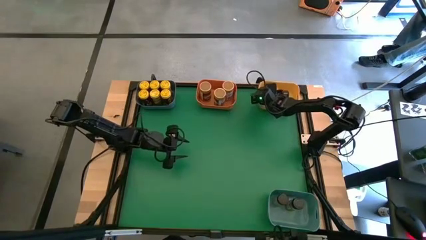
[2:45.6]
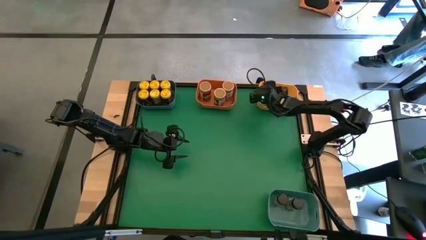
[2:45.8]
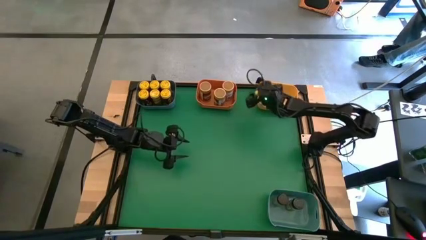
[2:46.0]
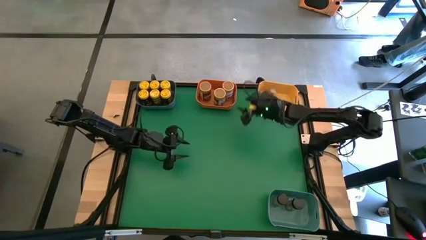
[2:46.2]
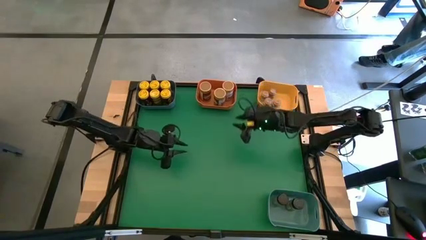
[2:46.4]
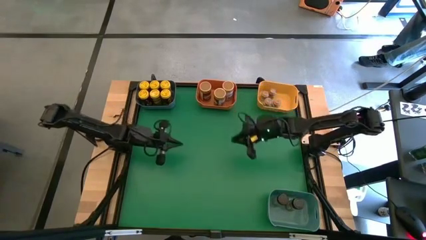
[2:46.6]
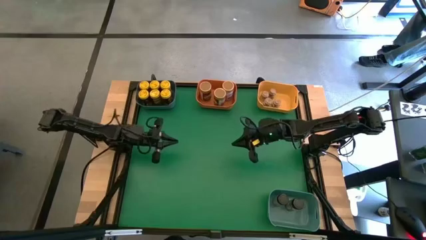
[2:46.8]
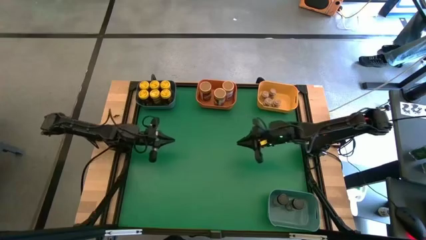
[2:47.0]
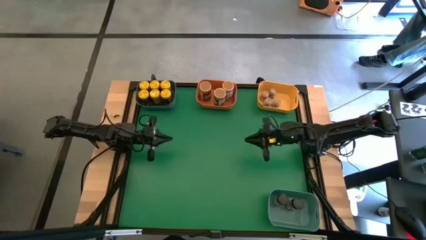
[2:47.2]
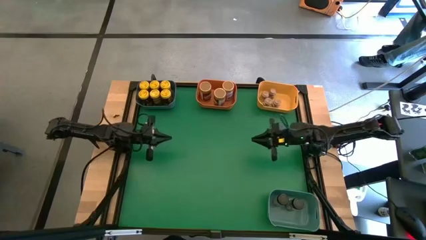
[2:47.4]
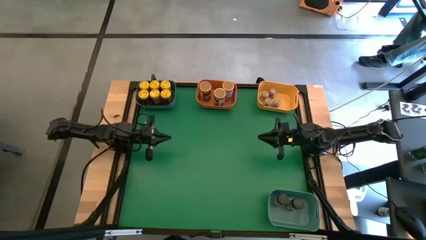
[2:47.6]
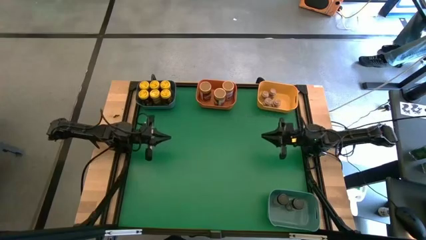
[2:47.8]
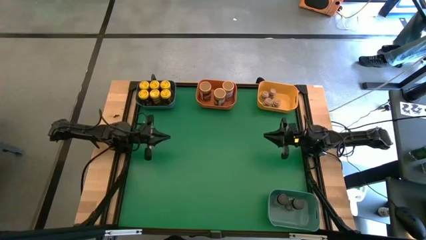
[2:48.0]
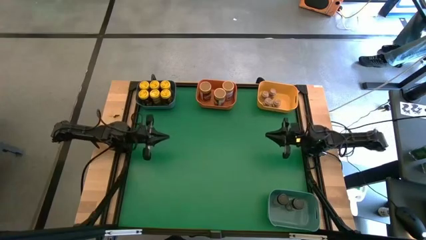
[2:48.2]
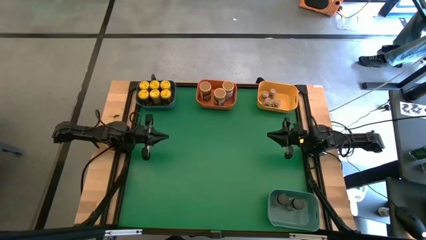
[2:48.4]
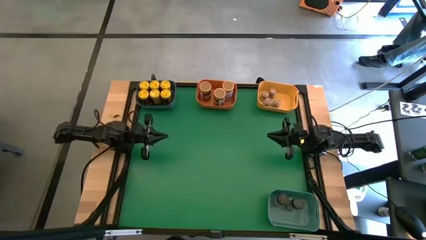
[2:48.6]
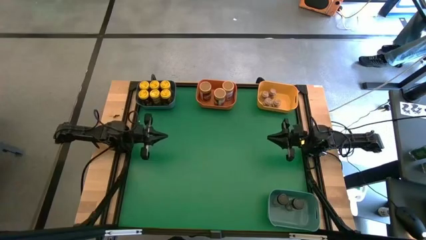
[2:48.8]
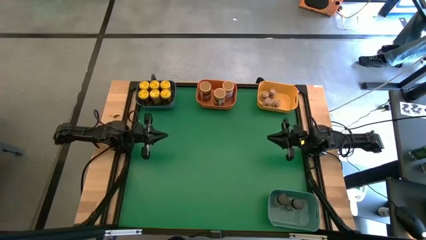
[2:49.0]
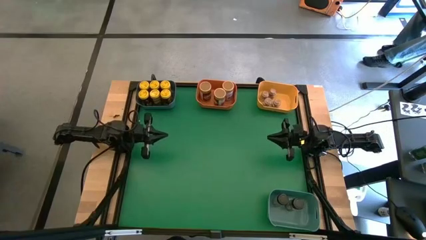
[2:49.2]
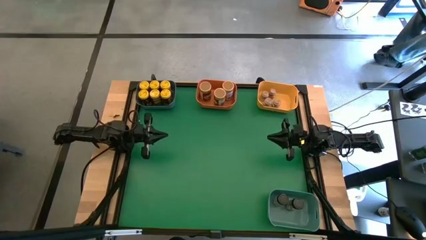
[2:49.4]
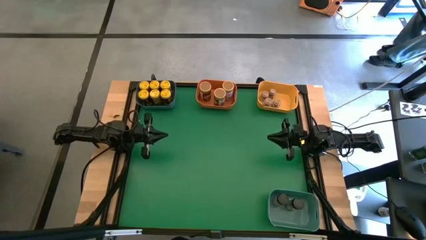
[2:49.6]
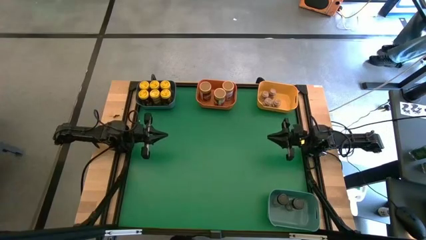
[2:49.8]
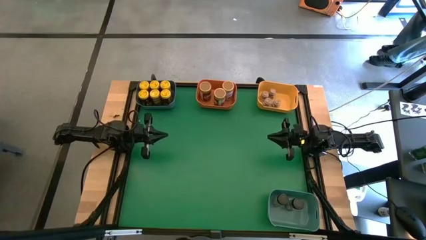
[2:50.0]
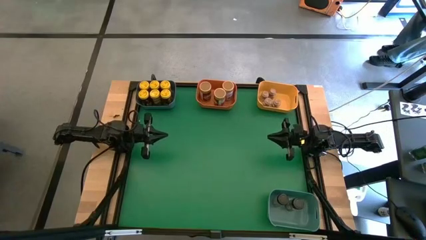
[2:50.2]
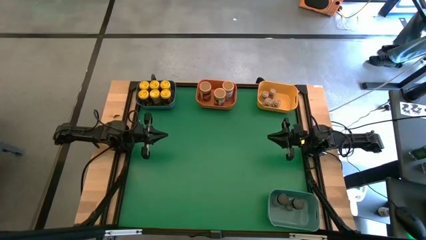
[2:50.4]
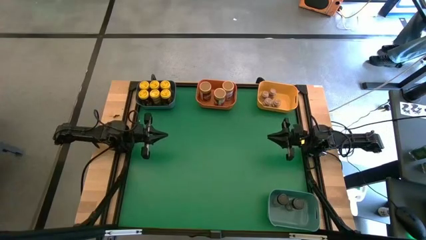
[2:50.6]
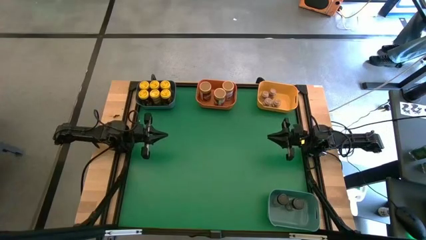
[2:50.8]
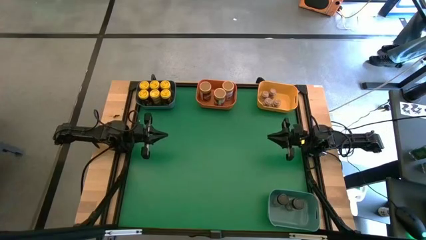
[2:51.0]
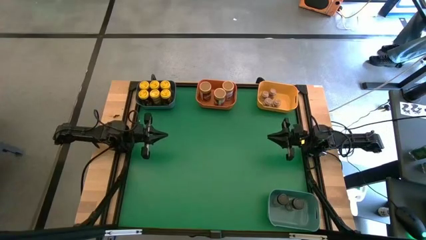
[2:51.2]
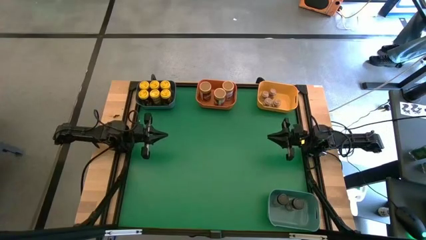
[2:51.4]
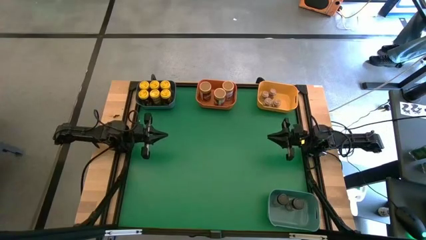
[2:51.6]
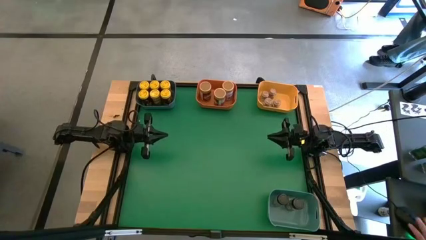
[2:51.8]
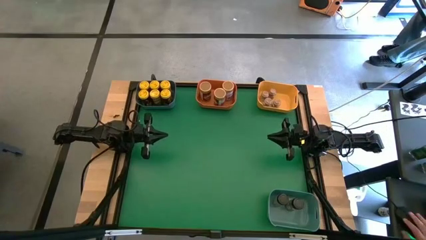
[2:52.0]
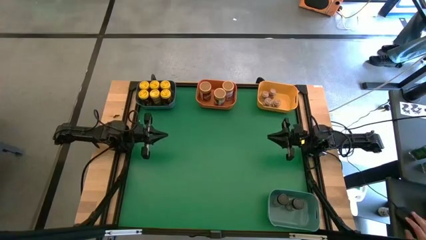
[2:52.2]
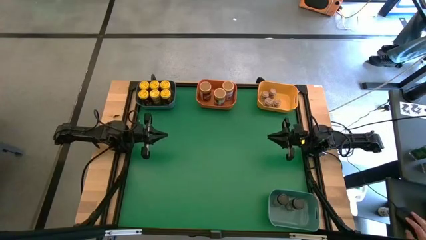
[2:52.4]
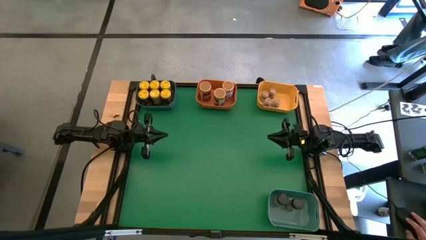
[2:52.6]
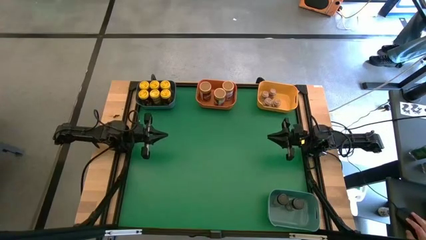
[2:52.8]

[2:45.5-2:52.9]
Task: Sort spices by type
Return to Home Position

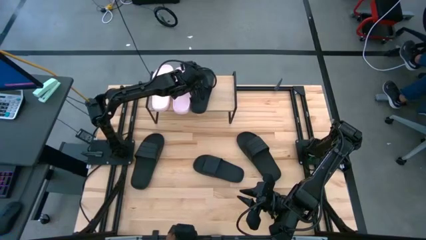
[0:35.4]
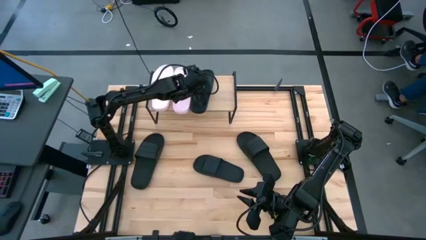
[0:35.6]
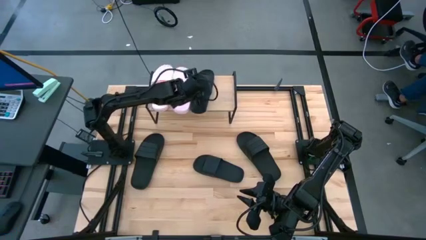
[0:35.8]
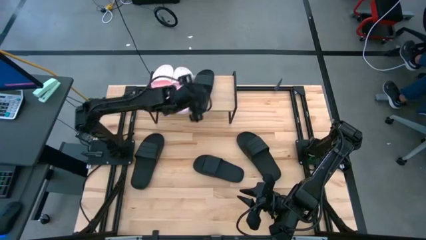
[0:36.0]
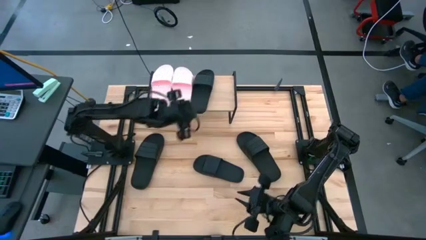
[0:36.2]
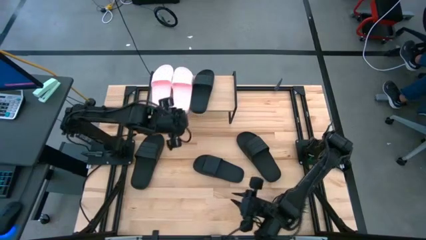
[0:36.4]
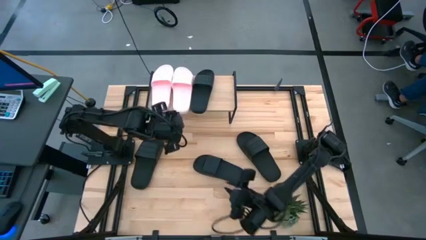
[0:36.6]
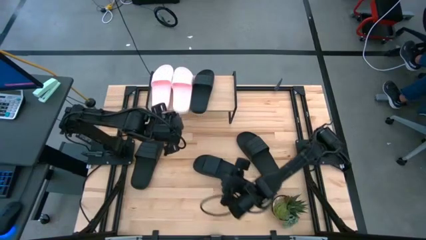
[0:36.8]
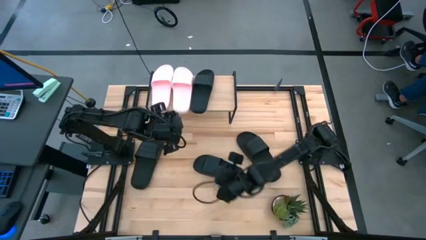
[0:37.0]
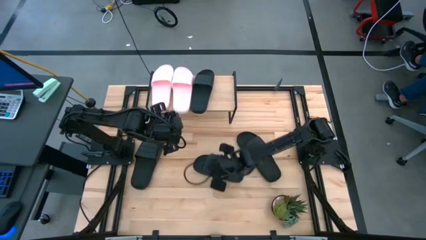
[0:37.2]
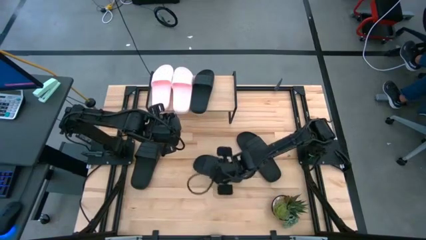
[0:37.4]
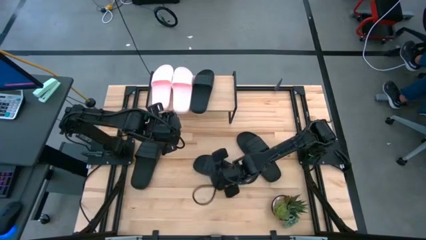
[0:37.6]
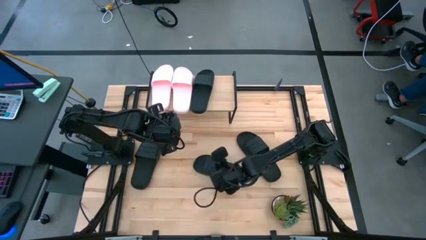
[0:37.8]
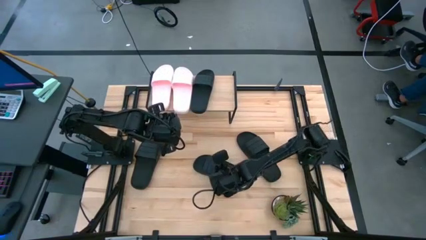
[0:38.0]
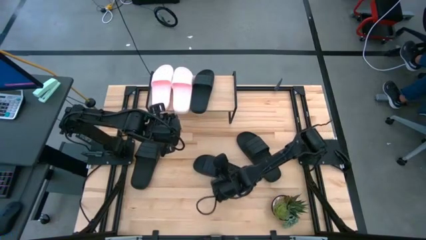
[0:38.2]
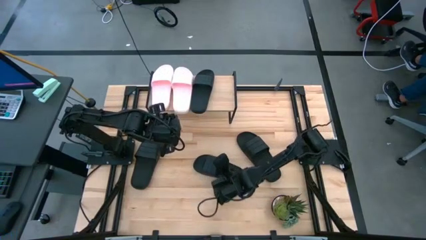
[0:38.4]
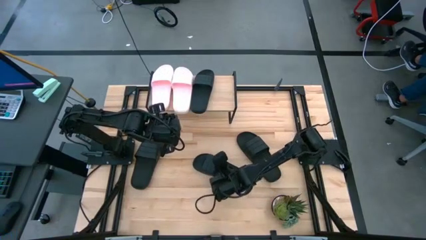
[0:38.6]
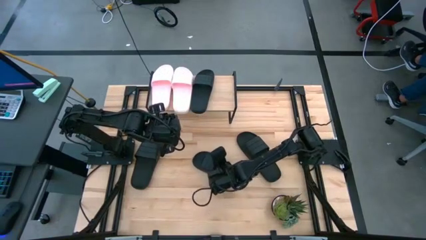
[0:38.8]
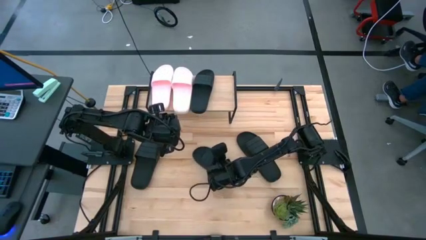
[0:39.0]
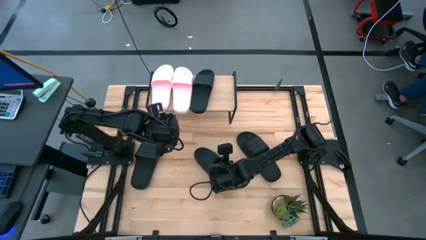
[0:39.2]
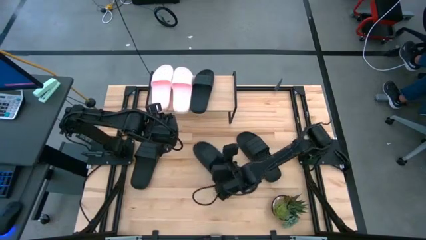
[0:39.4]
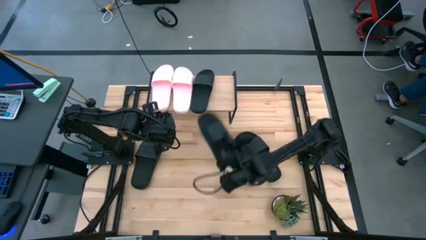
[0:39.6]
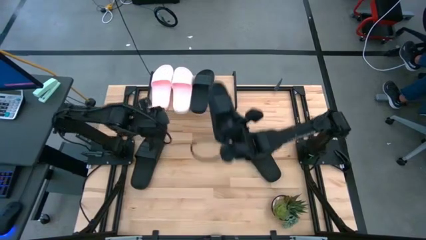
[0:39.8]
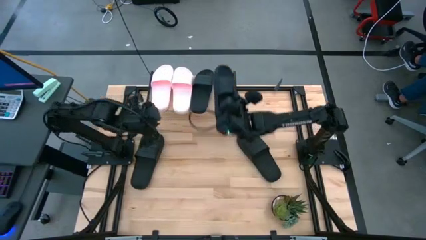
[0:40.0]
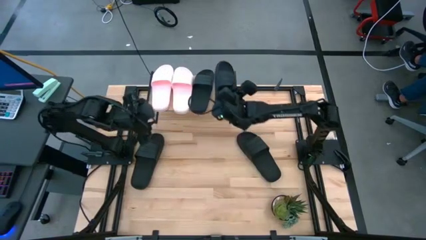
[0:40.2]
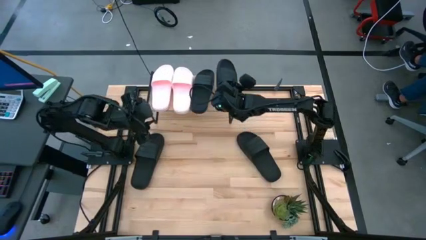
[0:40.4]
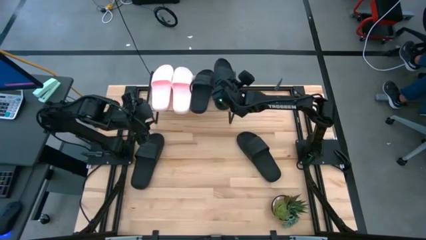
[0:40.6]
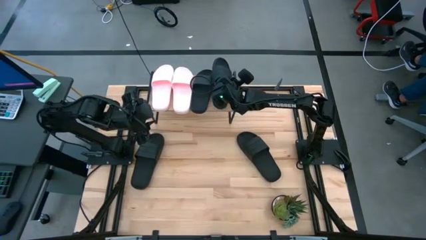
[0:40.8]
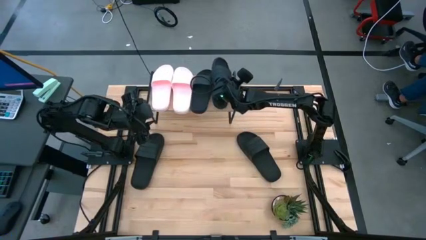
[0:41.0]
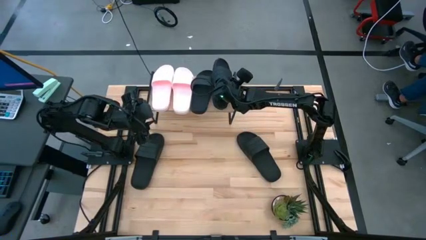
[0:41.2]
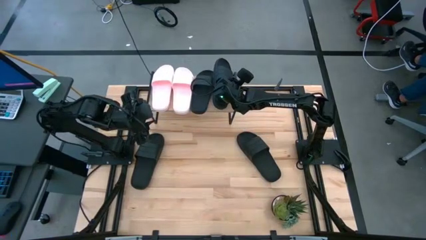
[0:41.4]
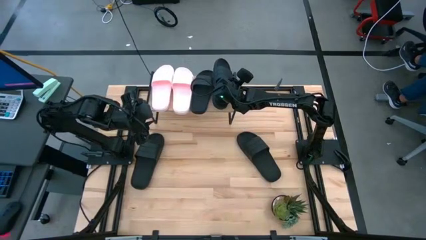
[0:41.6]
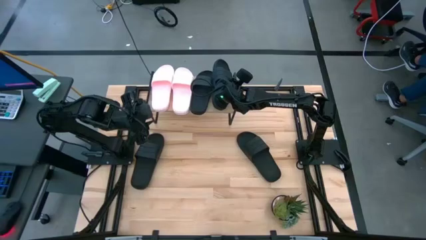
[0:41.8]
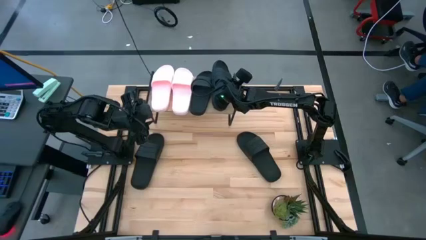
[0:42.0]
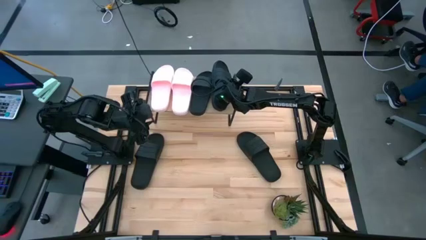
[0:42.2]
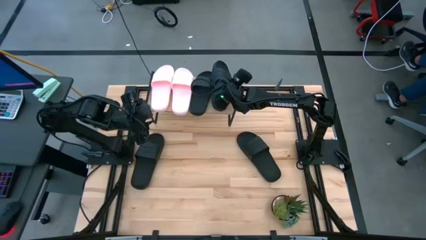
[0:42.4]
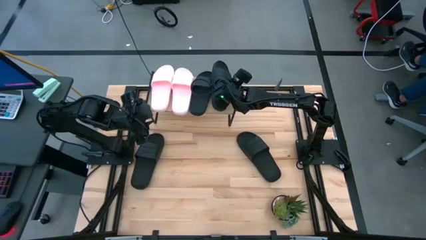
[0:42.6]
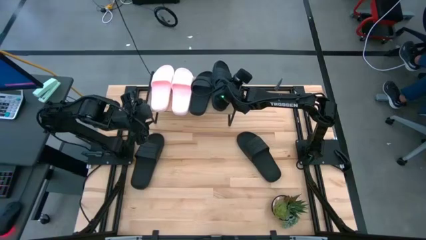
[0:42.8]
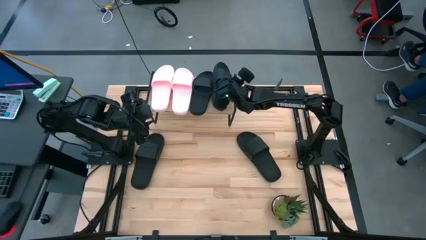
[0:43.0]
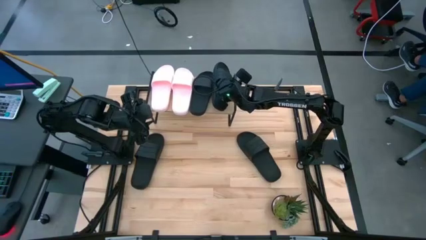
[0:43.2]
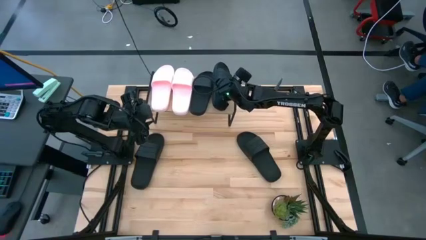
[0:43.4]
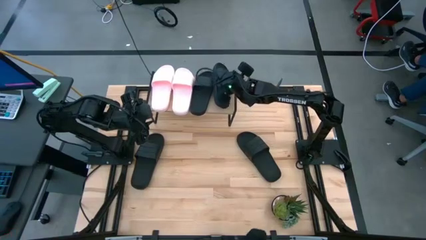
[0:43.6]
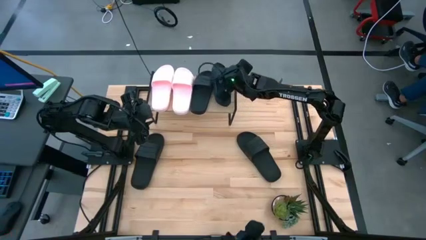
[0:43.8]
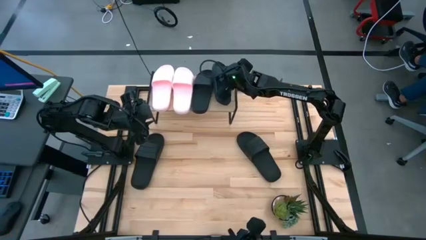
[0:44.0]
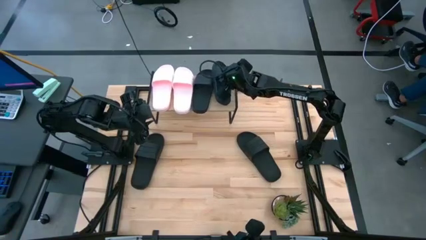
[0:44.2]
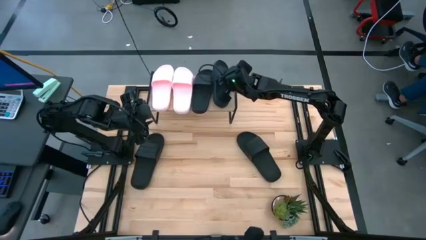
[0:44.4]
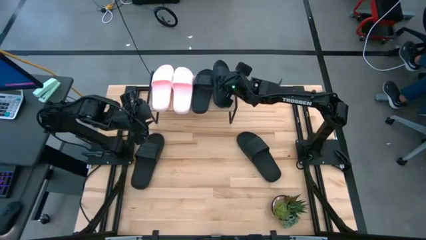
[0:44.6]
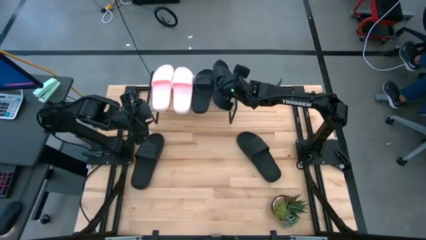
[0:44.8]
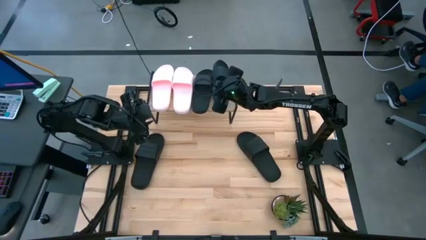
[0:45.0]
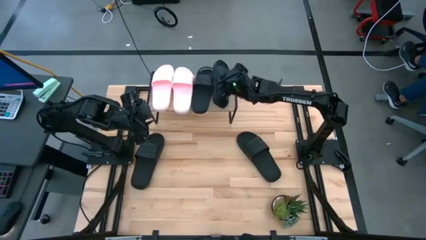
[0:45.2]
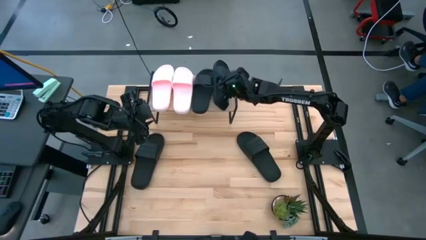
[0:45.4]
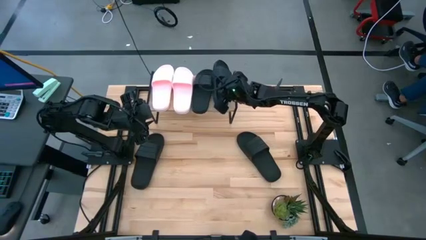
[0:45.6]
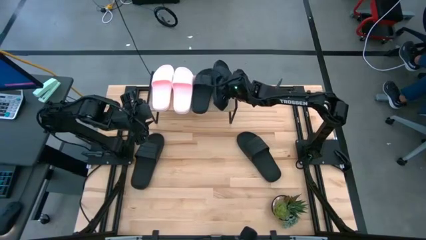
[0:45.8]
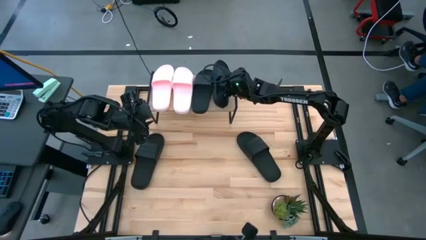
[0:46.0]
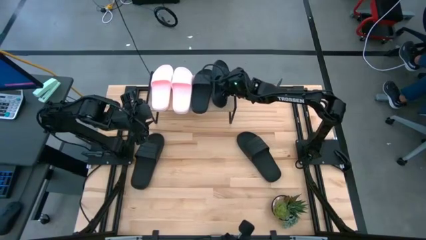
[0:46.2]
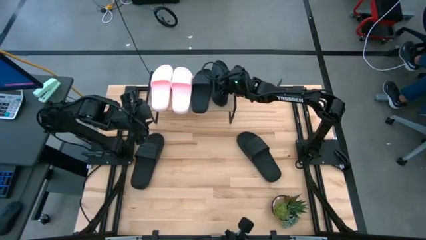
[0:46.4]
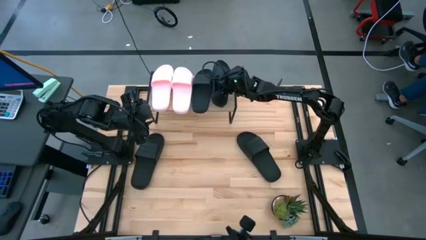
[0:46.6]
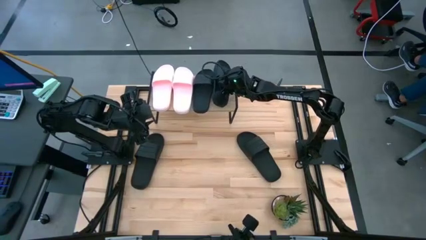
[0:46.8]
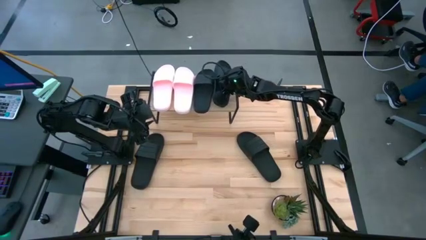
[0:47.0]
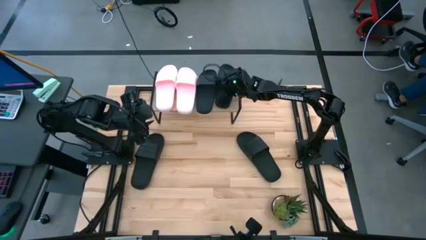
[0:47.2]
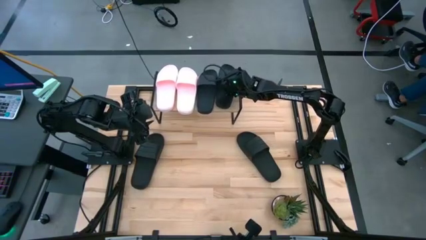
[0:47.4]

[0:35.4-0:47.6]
Task: Pick and place slides into the shelf
Put the black slide on the shelf
